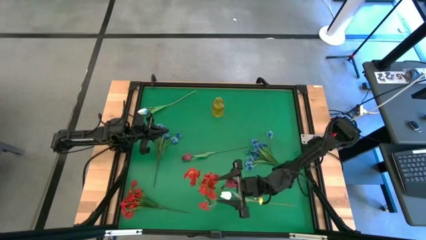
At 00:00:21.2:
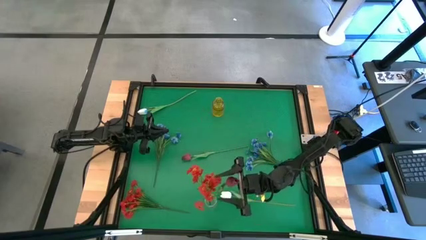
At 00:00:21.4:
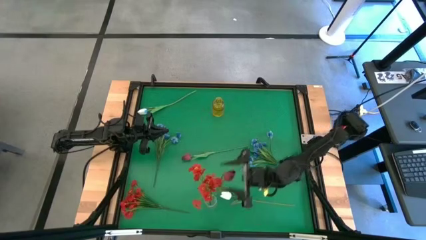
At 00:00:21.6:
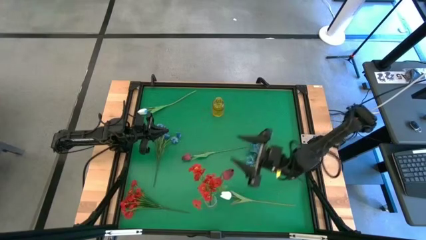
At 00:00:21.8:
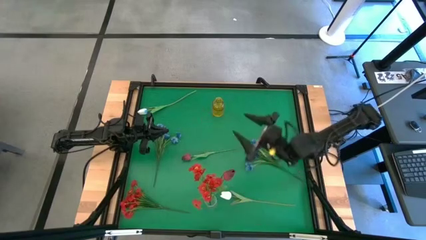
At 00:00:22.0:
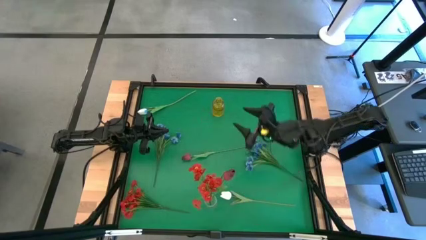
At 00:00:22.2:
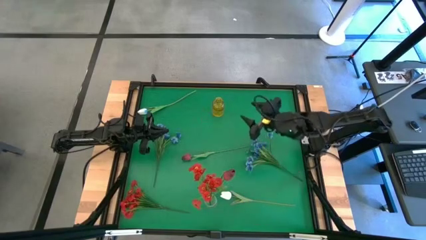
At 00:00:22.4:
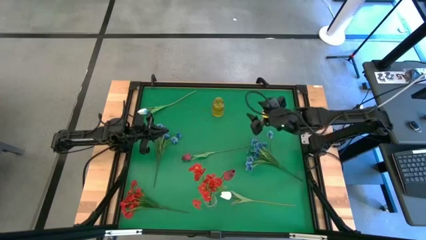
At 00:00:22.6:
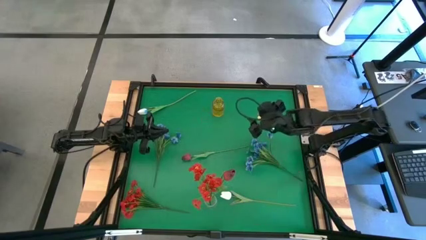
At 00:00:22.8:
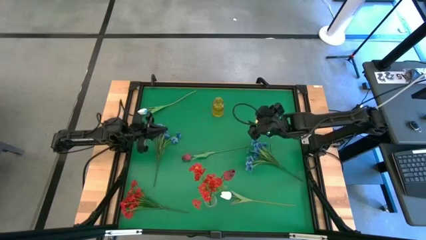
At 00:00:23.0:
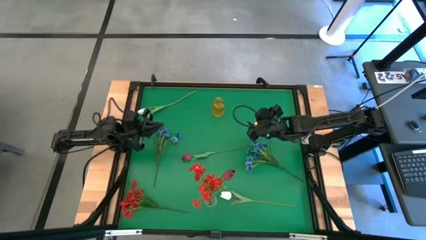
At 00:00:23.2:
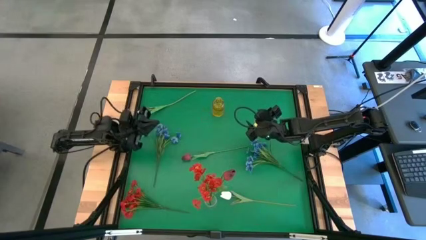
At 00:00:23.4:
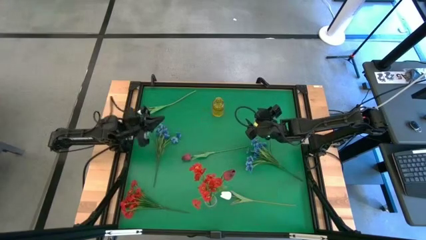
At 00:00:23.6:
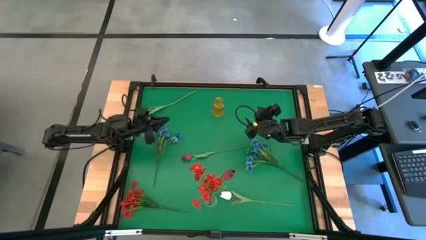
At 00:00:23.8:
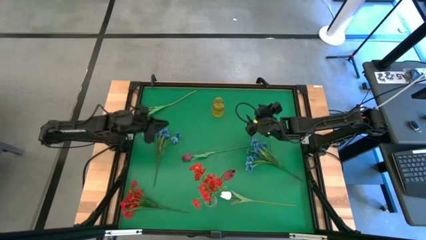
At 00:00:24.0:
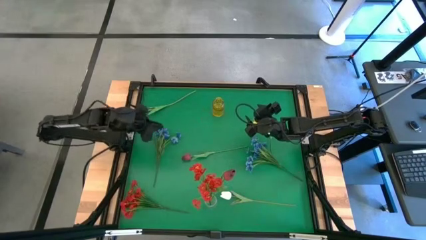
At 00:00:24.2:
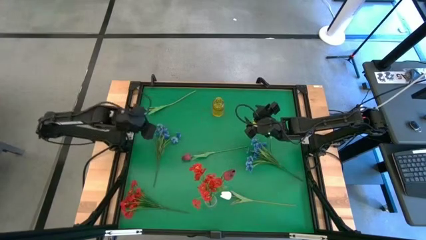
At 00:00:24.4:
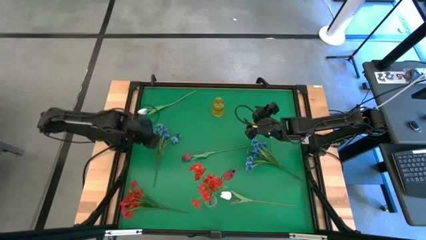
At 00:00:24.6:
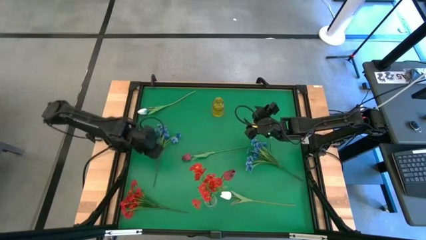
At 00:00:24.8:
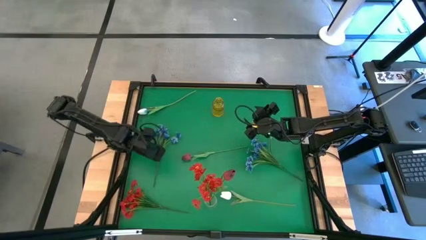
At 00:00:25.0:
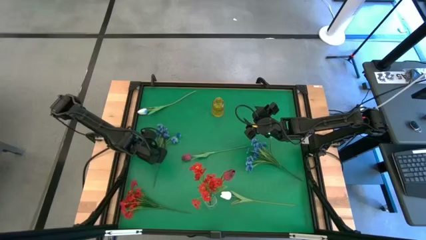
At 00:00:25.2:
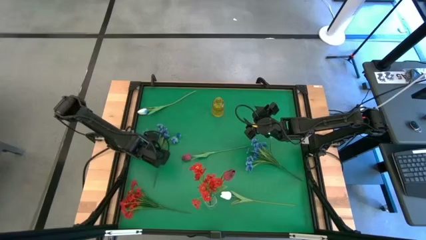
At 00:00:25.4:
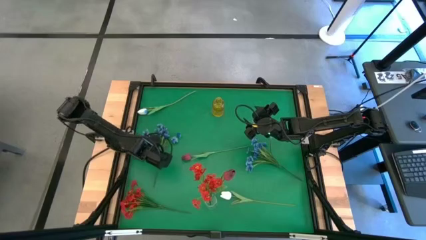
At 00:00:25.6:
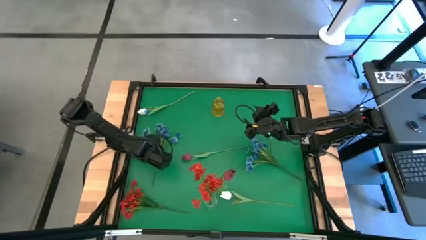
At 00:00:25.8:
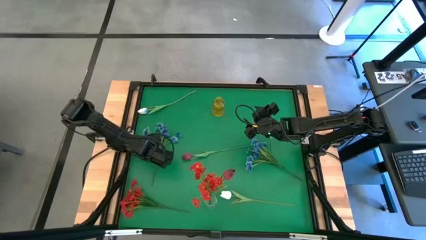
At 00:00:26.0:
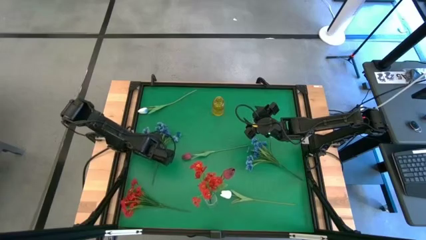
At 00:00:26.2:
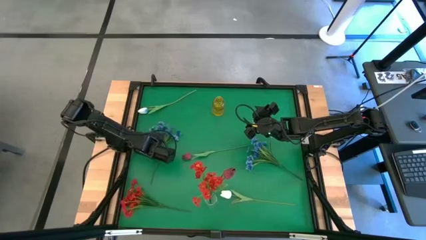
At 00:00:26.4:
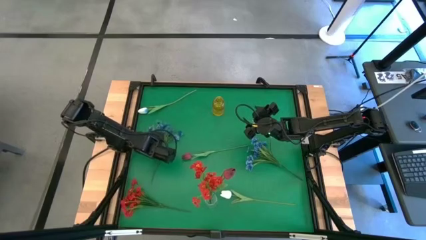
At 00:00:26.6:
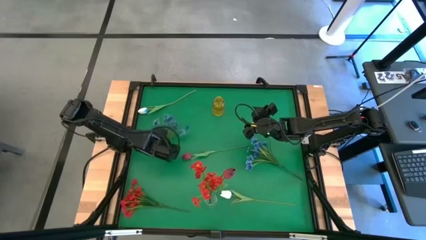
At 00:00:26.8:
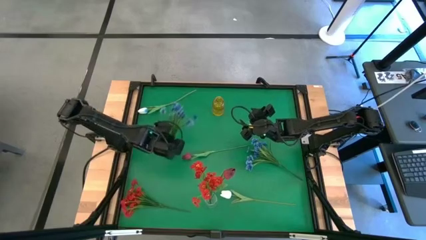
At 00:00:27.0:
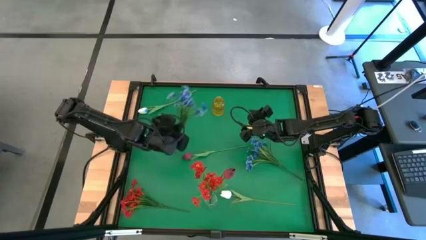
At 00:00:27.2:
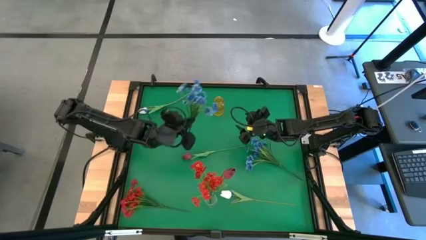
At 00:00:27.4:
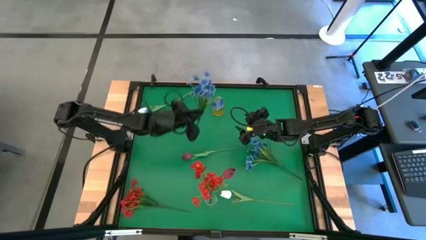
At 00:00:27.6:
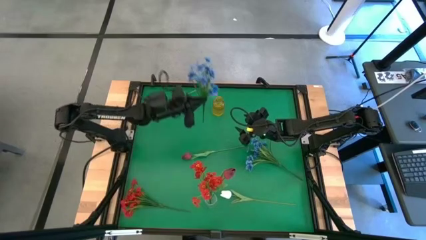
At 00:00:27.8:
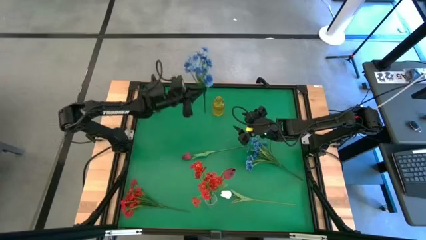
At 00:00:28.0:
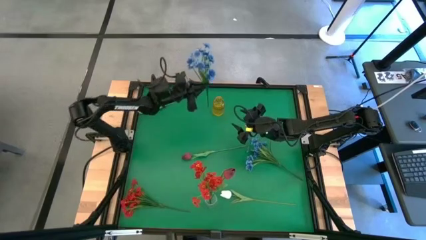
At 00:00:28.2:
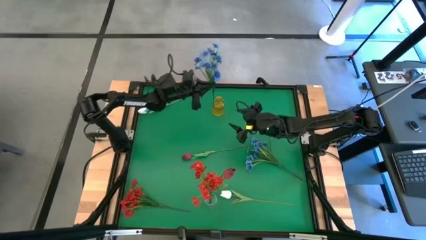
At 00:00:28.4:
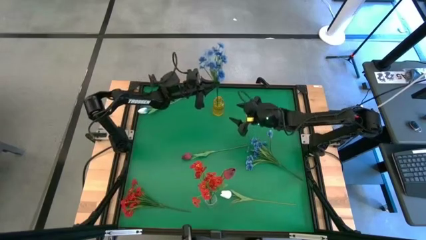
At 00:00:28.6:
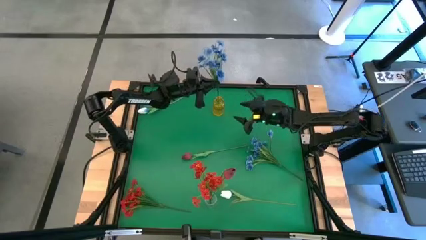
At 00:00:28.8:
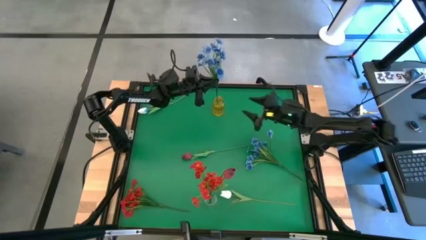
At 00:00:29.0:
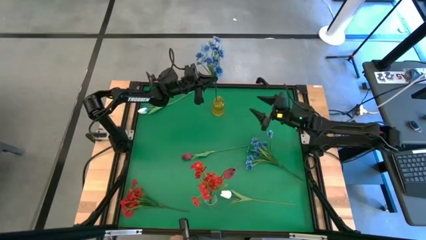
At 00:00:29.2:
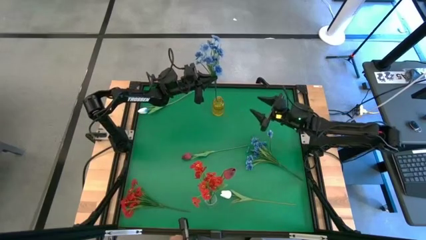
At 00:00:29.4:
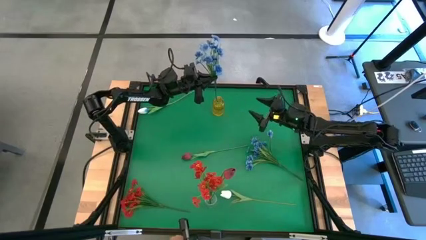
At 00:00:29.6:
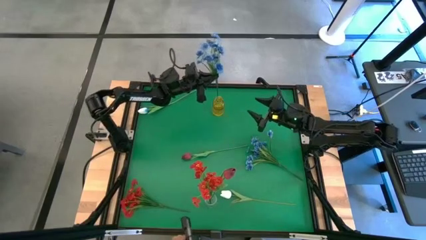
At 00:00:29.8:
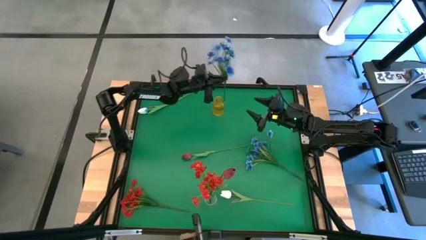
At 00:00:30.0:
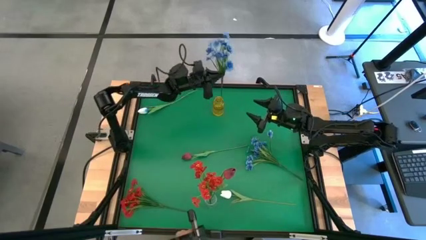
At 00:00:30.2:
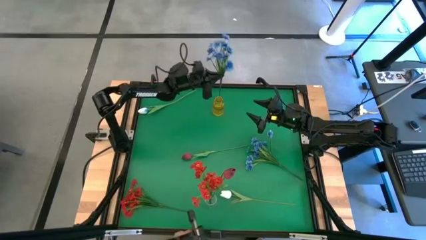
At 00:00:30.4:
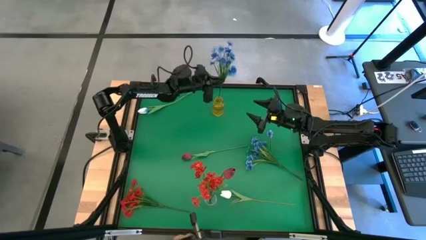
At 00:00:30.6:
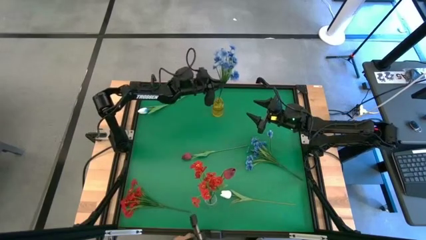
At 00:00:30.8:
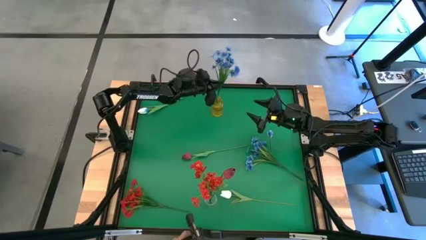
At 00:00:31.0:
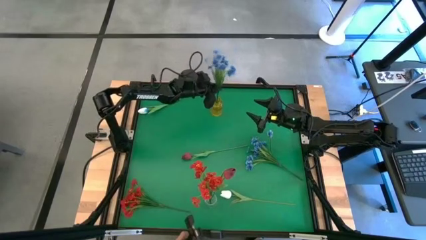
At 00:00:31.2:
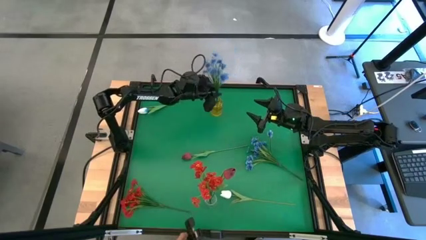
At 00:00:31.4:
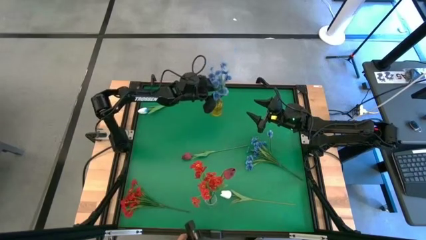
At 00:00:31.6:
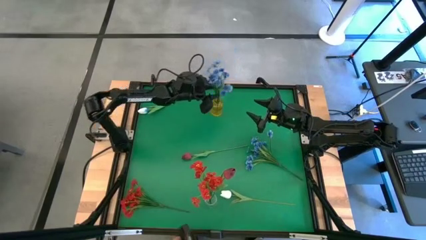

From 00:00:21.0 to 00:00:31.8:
Task: Sort flowers into vase by color
Put the left blue flowers into the yellow vase
